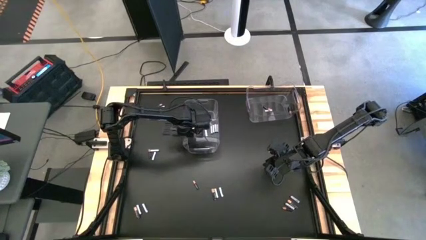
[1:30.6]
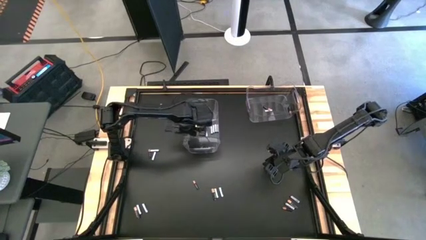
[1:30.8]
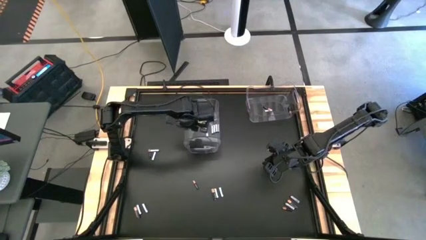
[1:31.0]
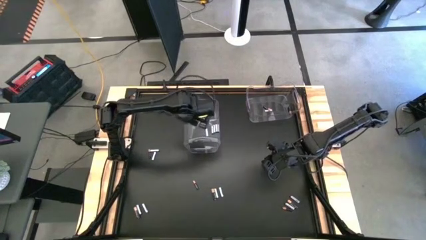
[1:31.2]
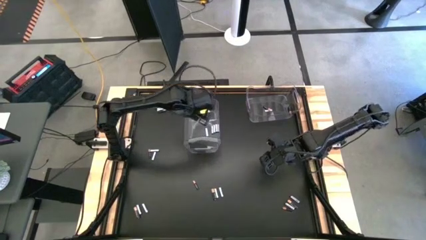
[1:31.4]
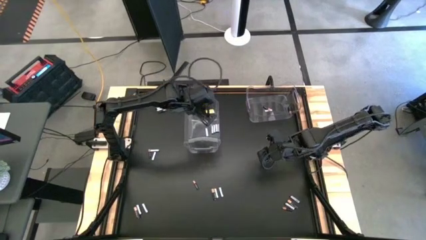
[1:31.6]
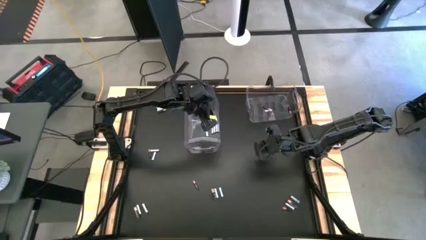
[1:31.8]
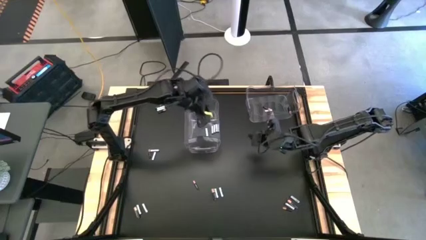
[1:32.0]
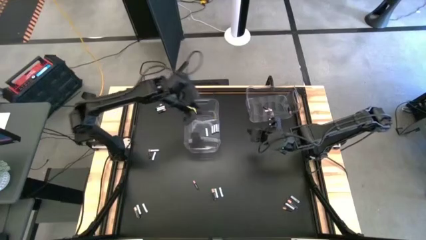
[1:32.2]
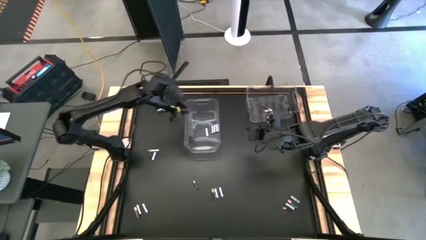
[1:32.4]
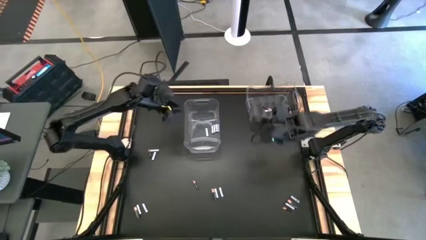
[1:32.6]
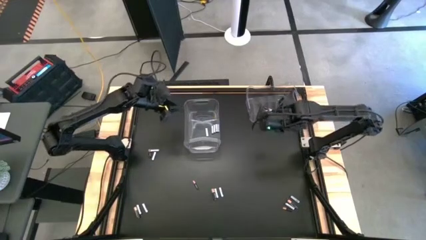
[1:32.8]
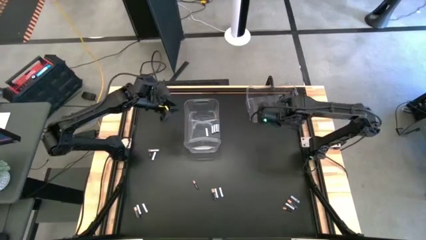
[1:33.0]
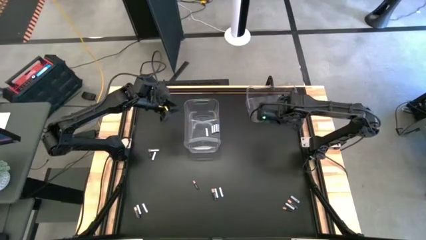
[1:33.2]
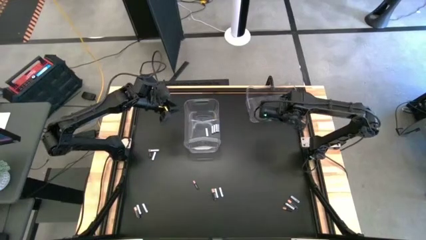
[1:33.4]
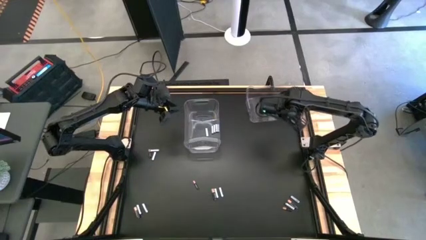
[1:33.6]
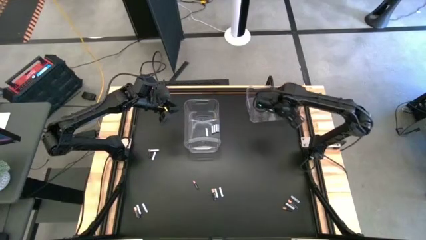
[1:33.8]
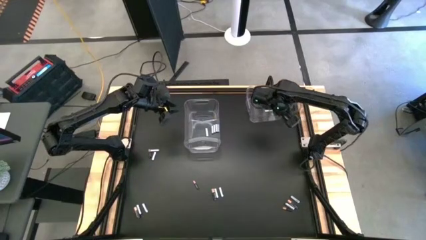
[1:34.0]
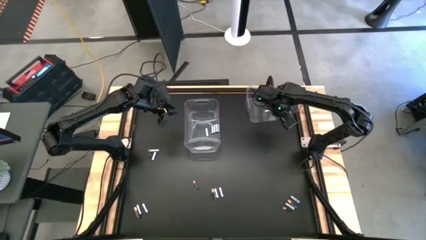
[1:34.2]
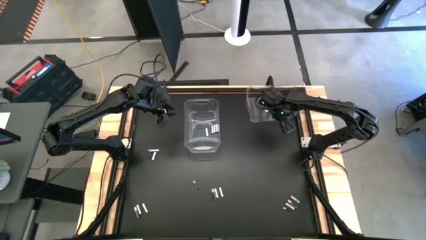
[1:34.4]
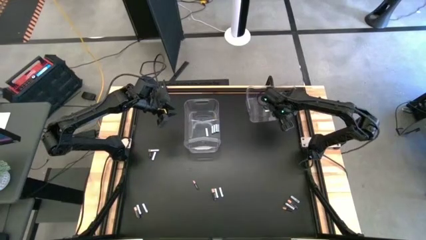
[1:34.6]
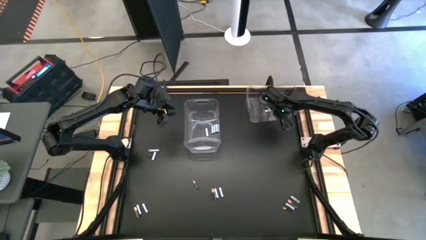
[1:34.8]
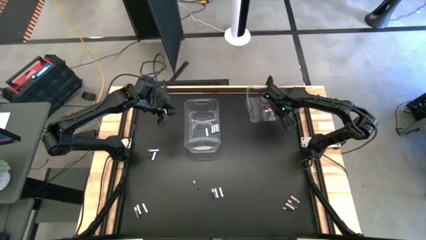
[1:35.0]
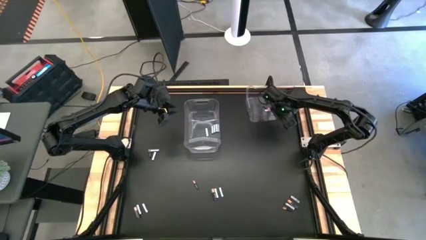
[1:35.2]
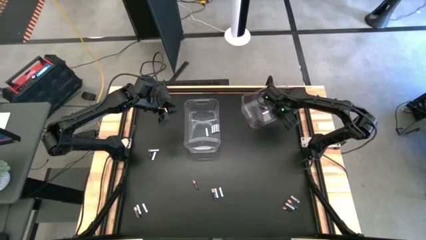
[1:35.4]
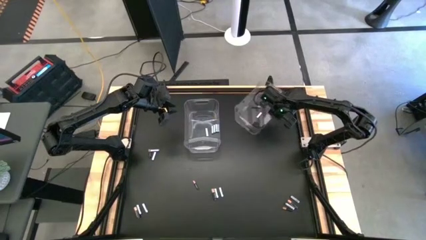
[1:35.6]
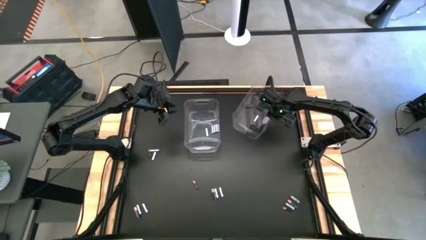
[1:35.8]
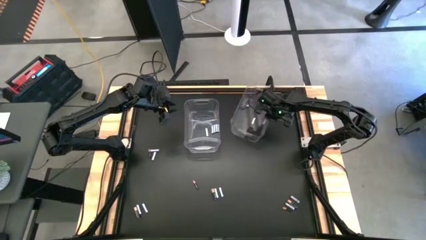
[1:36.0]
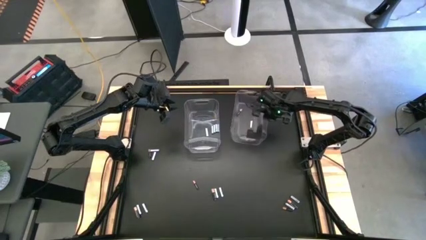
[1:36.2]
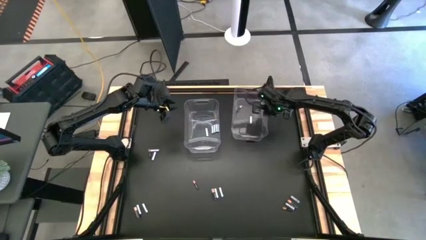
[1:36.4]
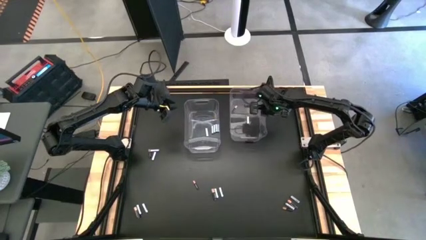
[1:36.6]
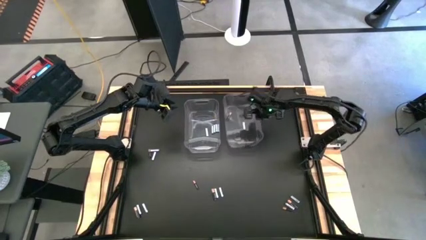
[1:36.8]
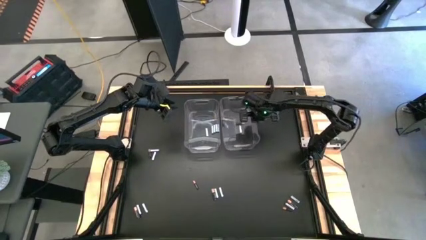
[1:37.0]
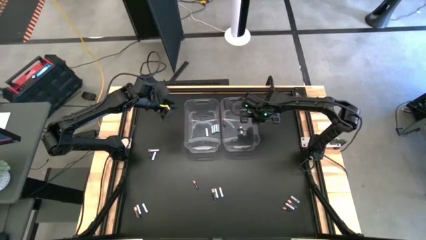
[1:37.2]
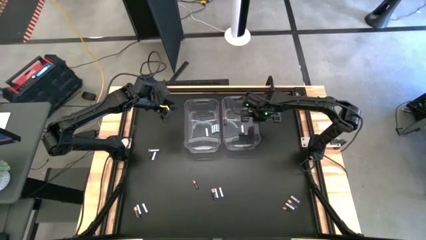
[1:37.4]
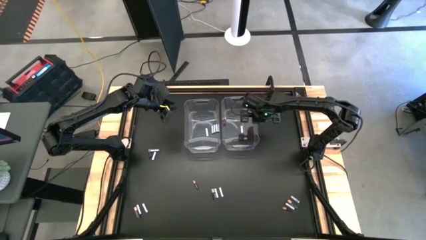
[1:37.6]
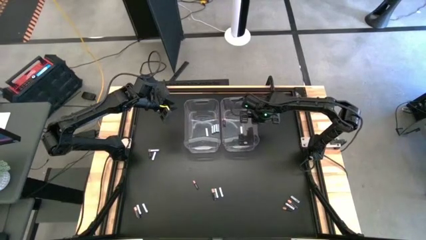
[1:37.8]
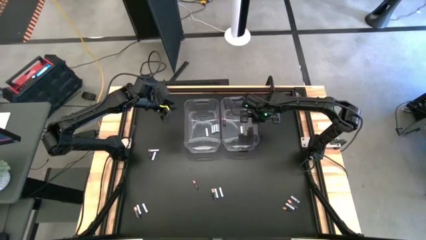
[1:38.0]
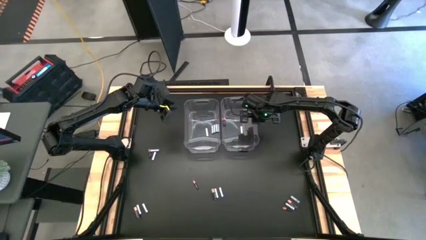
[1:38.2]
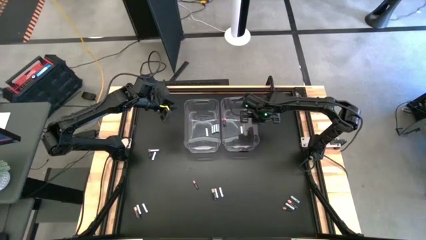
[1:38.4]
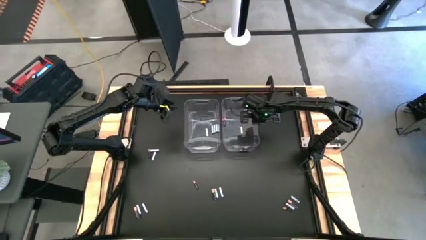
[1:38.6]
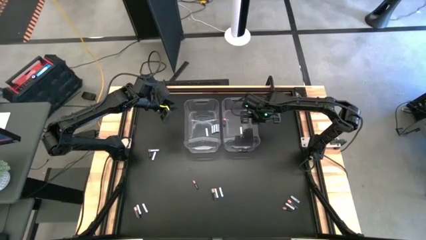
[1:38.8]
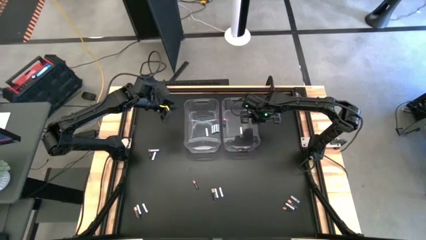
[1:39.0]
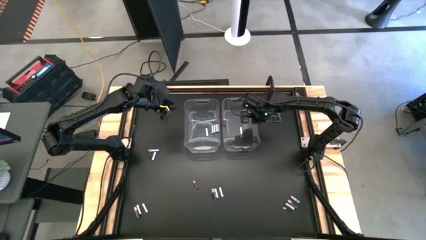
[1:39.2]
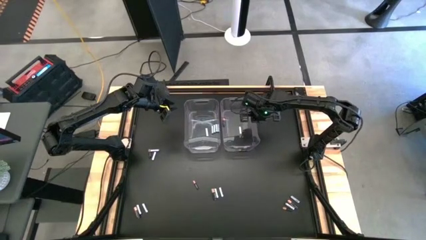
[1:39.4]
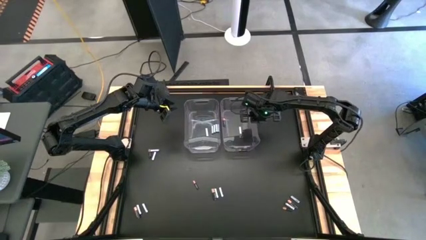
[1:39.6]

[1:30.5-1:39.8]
Task: Sort batteries
Move the top transparent bin to the top center of the table

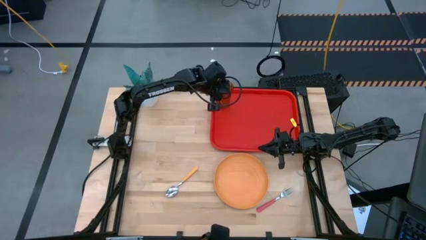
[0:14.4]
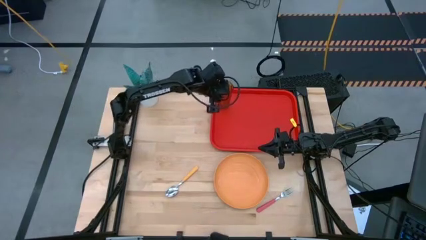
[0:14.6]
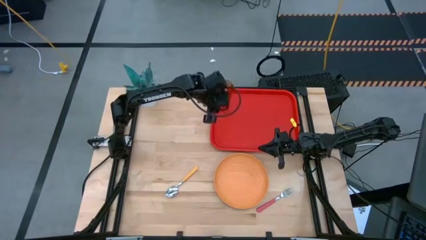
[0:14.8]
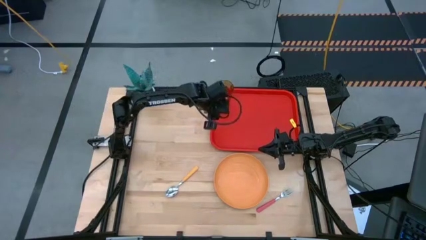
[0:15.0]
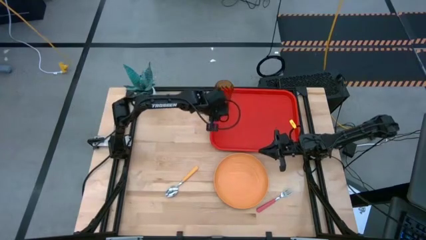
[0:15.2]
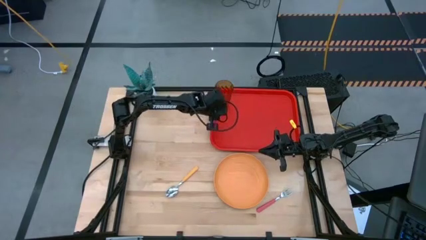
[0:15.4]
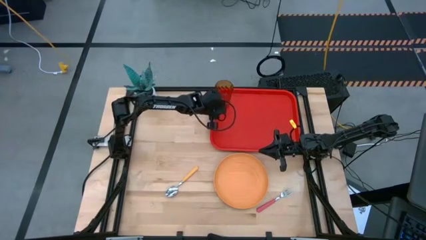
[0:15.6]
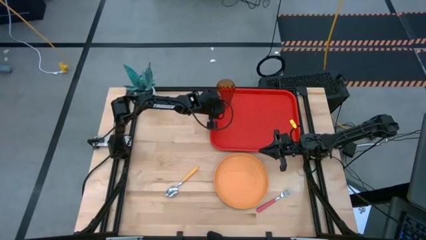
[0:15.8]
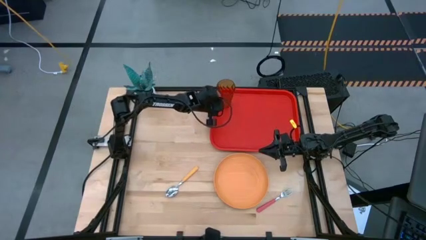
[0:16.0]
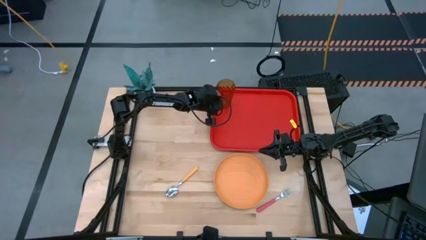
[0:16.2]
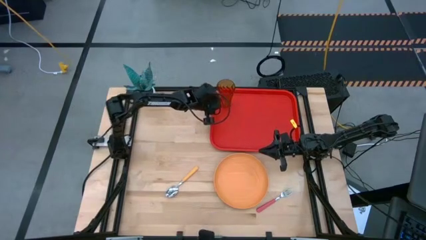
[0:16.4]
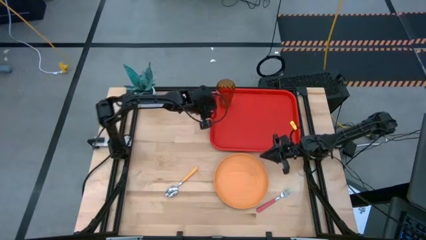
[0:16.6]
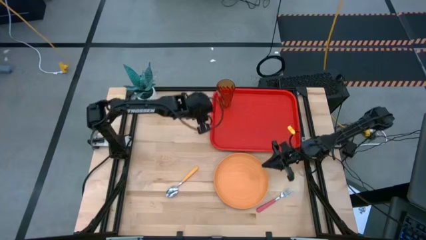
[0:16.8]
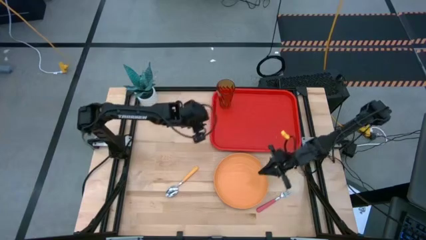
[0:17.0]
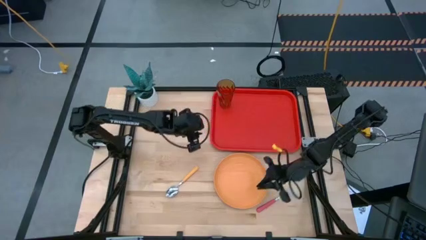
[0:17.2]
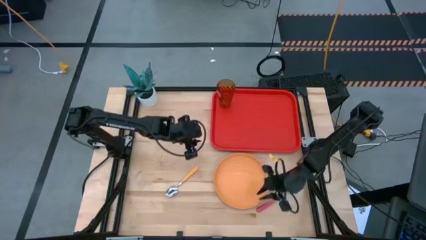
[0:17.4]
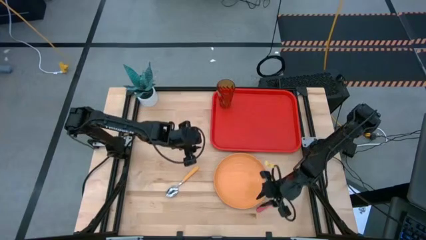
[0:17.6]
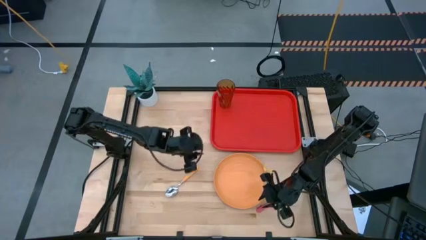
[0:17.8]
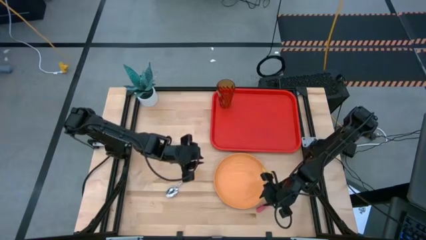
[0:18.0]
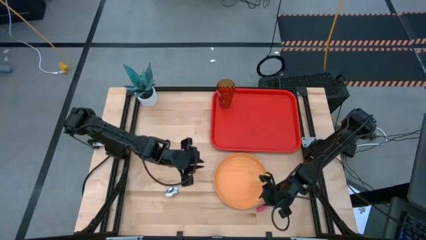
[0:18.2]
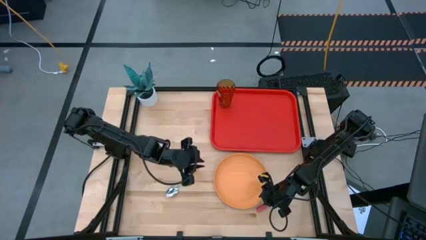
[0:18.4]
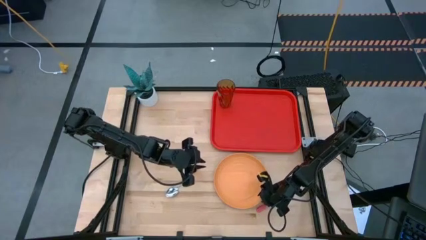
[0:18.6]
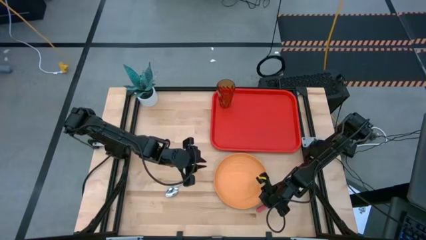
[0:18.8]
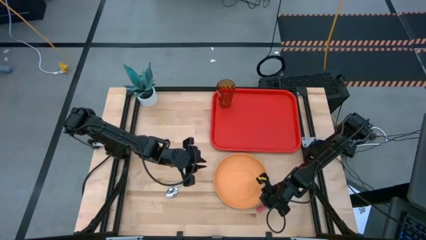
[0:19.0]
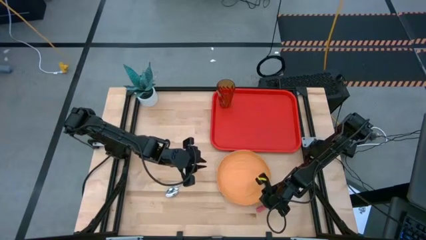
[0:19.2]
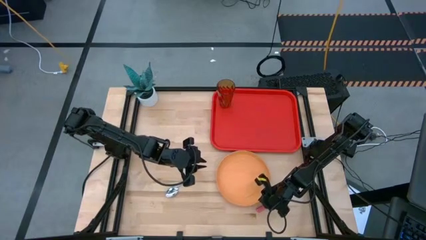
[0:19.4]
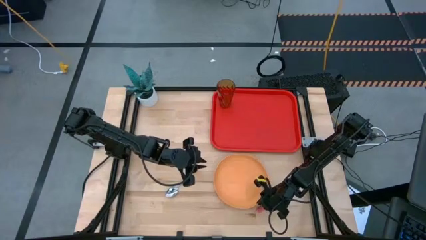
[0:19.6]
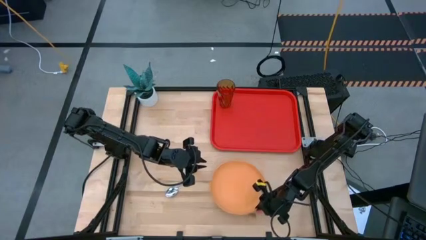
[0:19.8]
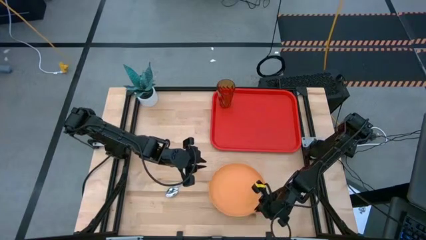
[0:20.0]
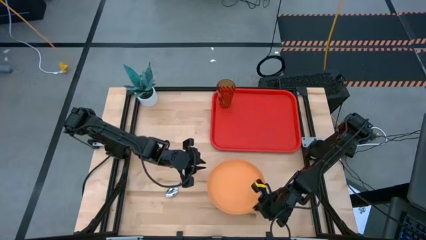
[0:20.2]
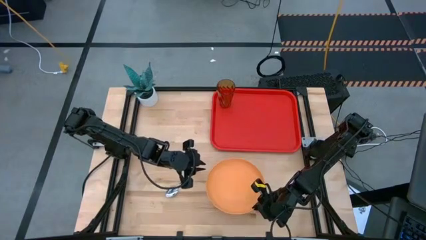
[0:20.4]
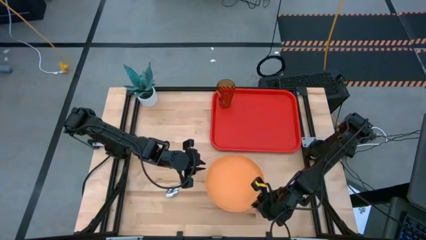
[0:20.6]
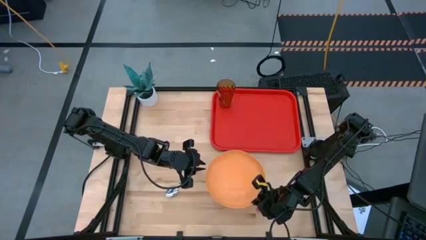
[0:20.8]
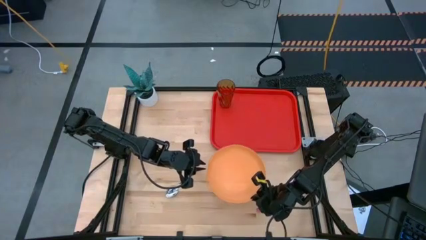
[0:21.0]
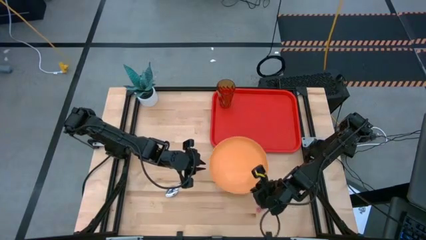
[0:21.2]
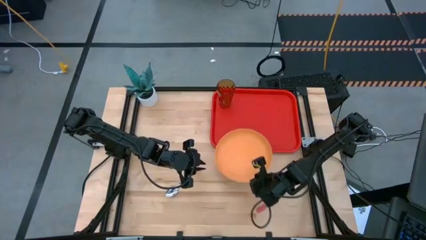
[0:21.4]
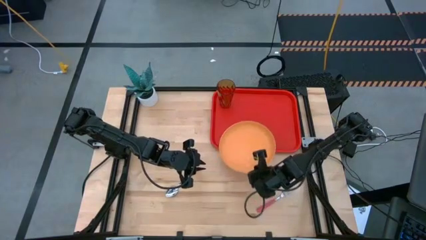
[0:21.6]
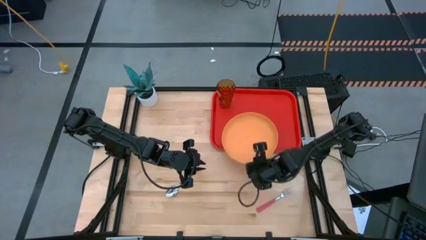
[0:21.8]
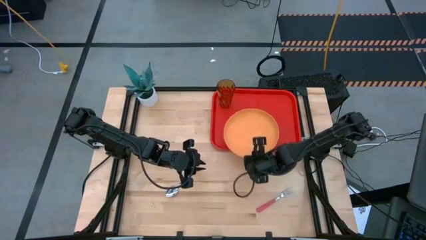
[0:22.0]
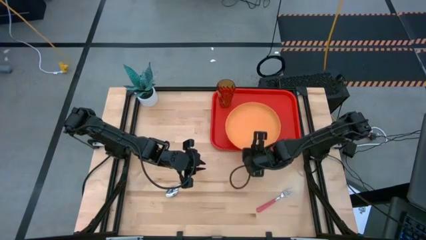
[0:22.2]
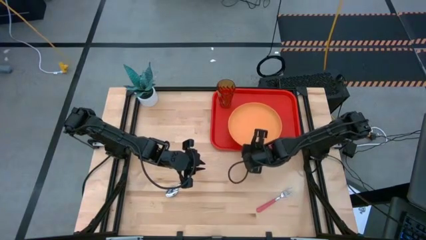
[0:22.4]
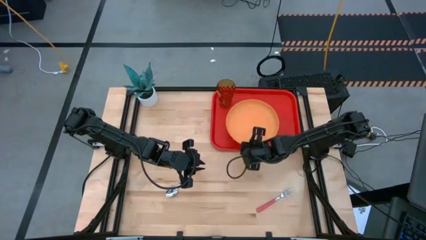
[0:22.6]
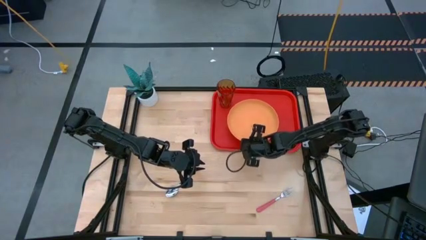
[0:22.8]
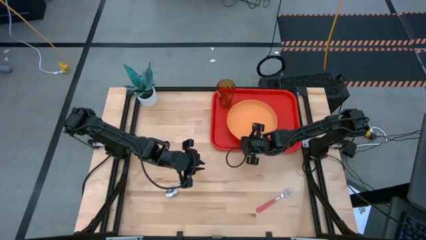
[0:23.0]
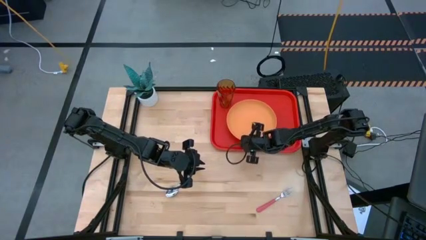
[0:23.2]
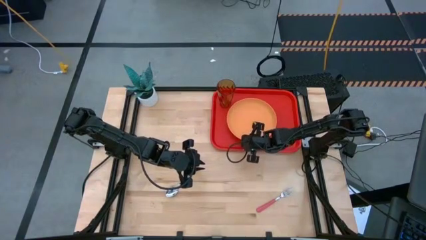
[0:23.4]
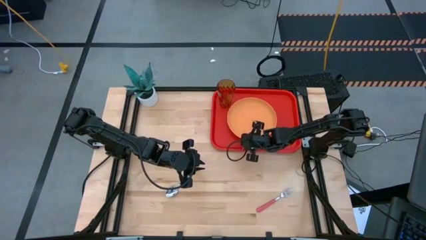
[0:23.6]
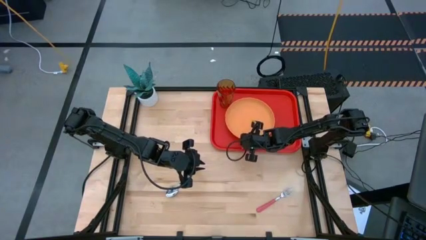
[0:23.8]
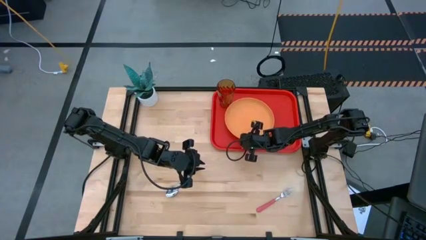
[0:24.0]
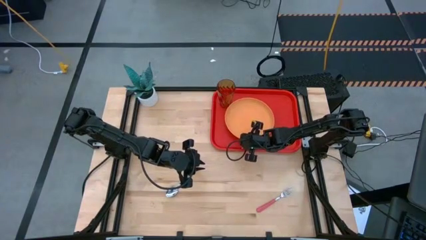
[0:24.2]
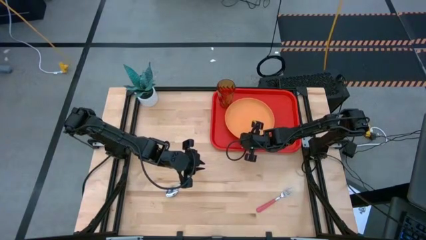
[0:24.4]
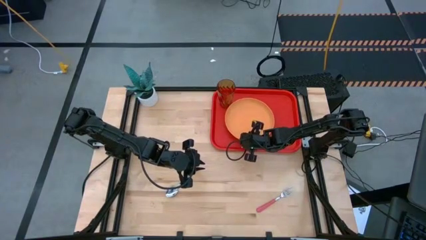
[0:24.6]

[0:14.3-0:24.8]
Task: Pick and place plate/cup/fork/spoon on tray
Put the orange plate on the red serving tray to the bottom right of the orange cup
